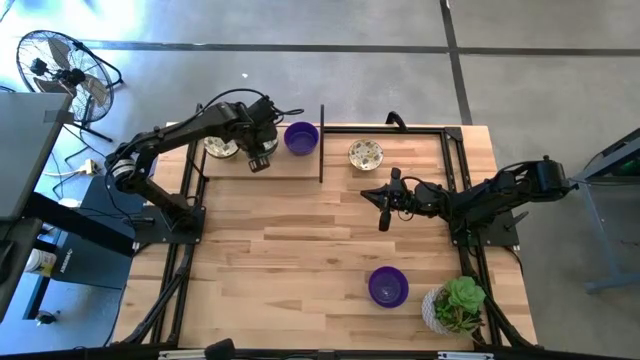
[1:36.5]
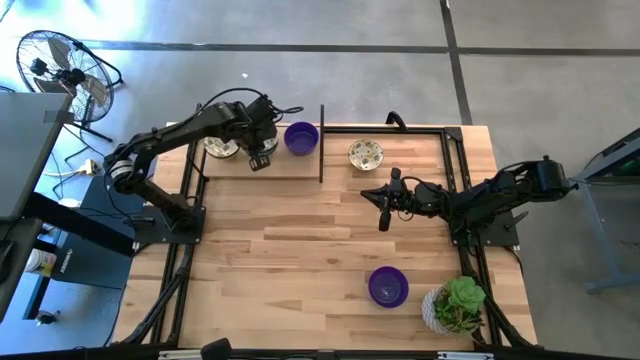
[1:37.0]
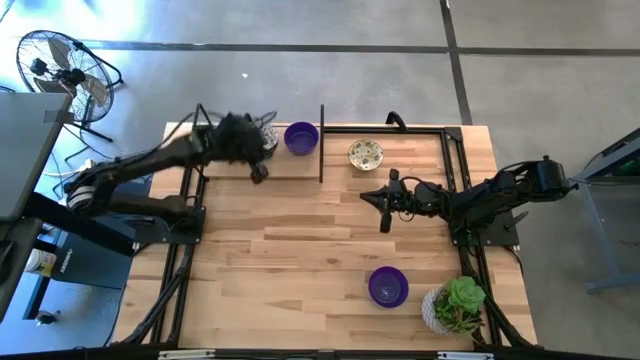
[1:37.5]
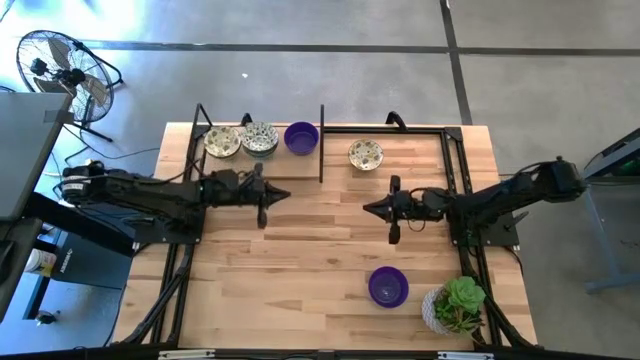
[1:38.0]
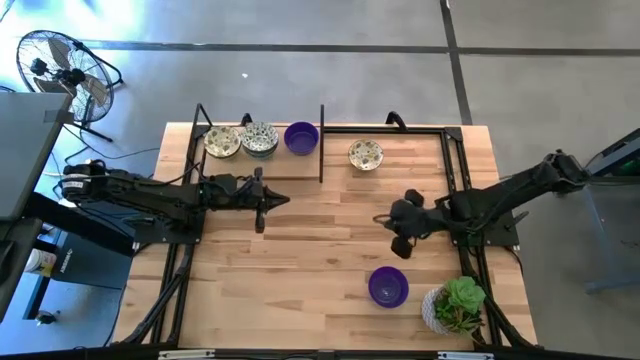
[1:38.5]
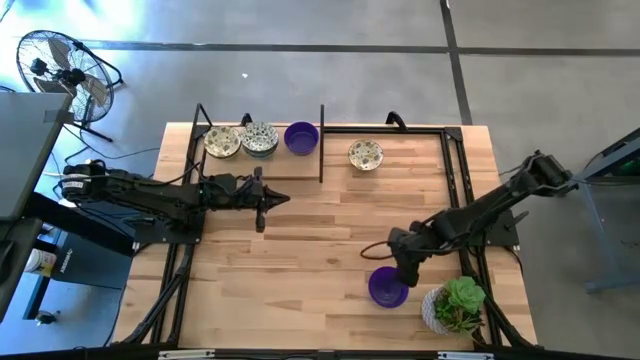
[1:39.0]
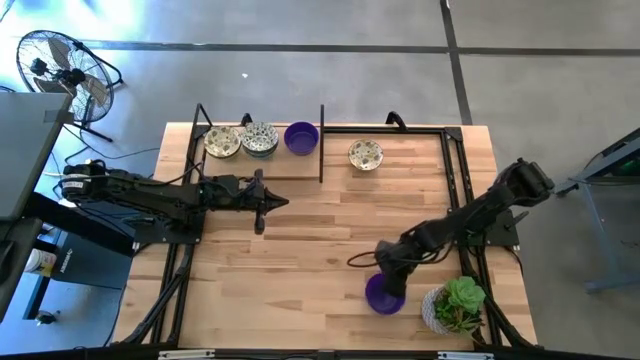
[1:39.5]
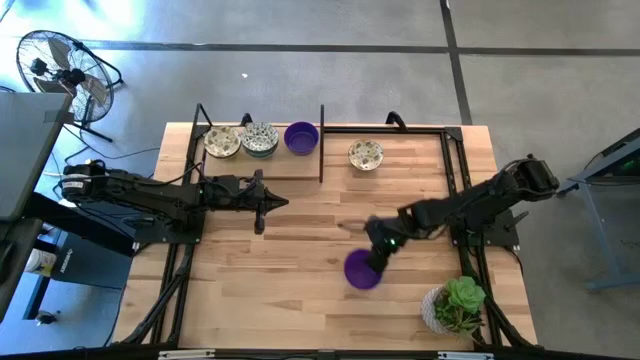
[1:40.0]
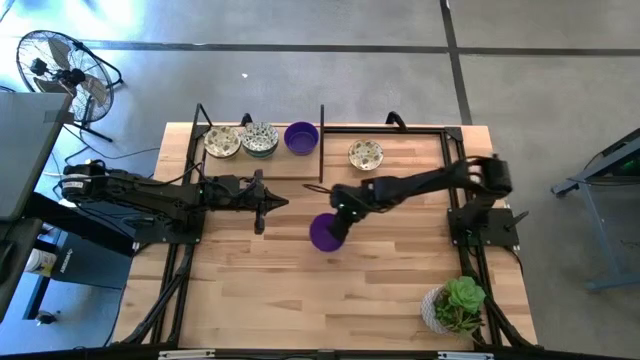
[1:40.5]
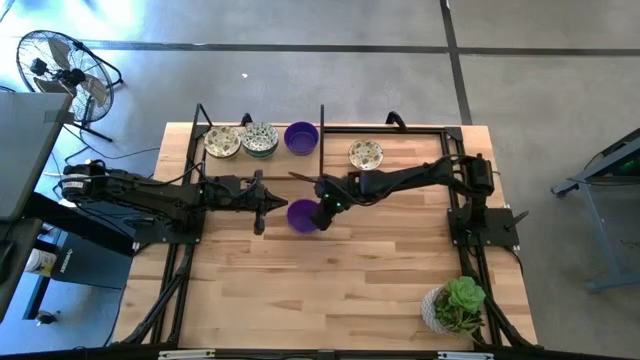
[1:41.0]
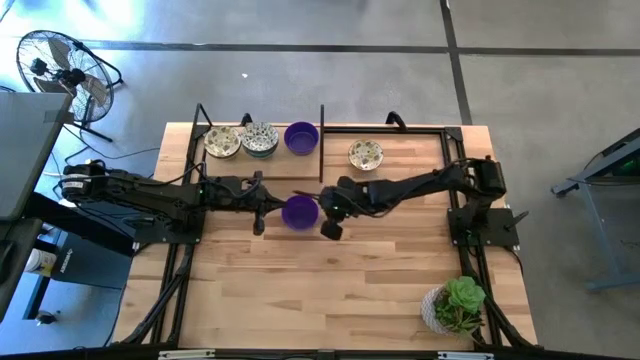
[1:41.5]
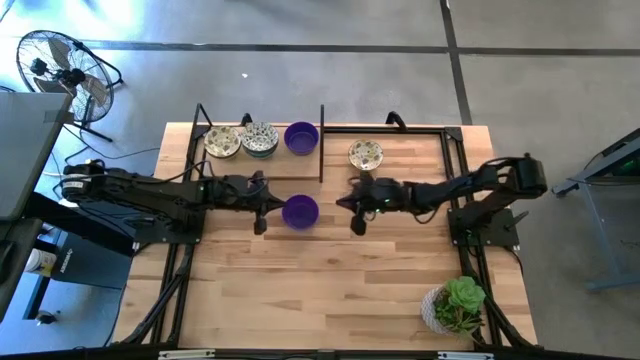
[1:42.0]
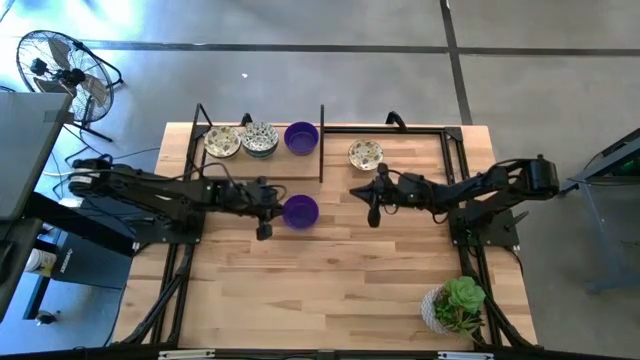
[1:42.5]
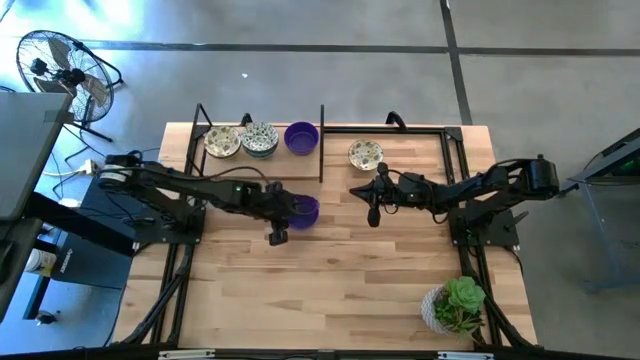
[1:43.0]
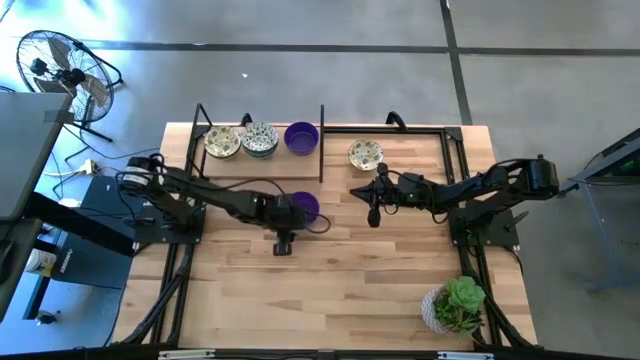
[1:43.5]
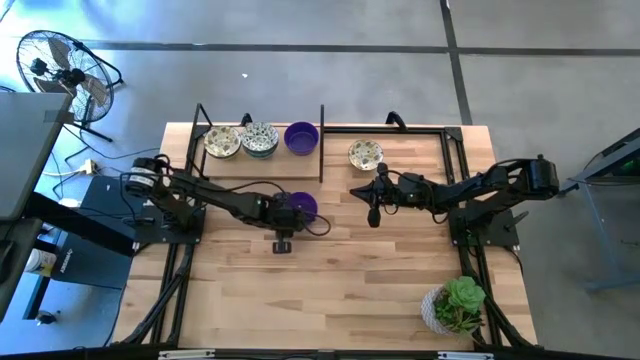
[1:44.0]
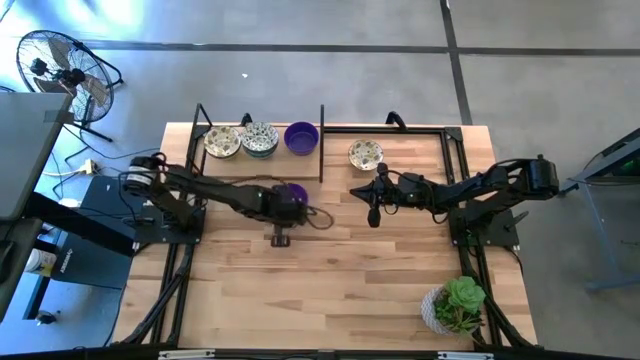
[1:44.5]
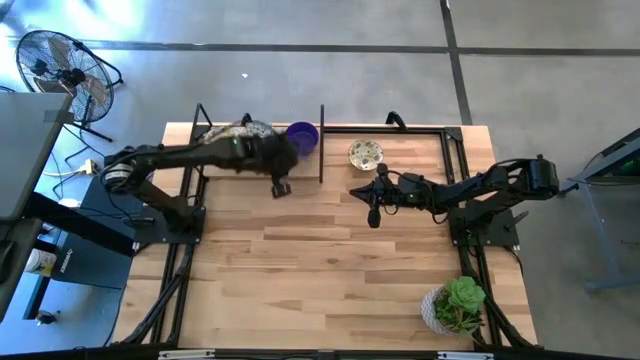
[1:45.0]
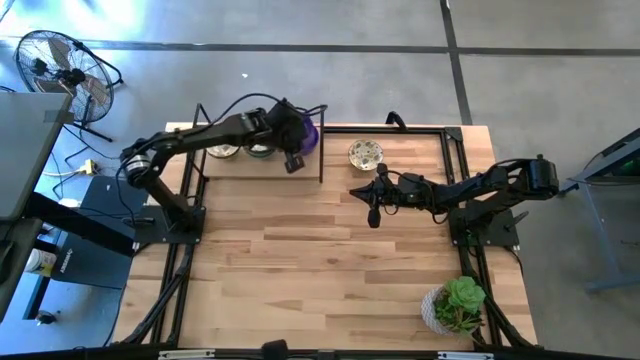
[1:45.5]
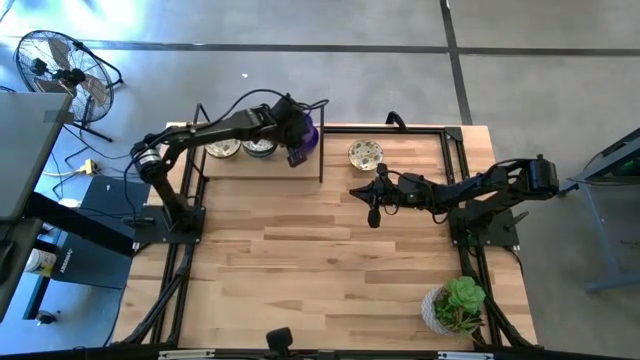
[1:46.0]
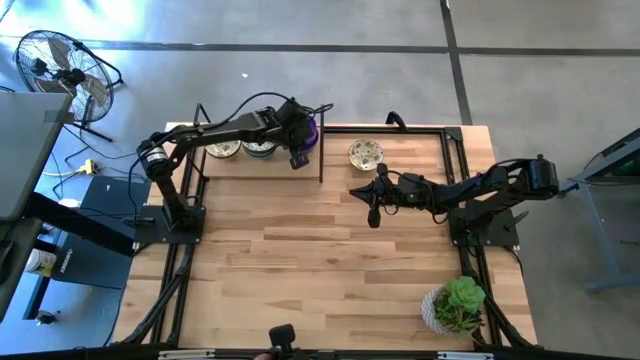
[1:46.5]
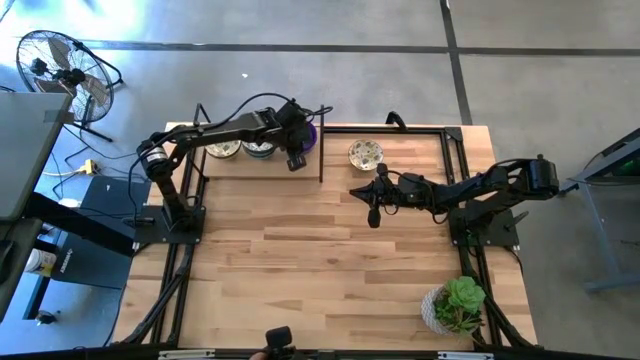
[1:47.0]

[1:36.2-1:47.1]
Task: Pick & Place Mini bowls
Stack the violet bowl on top of the other violet bowls on the shelf

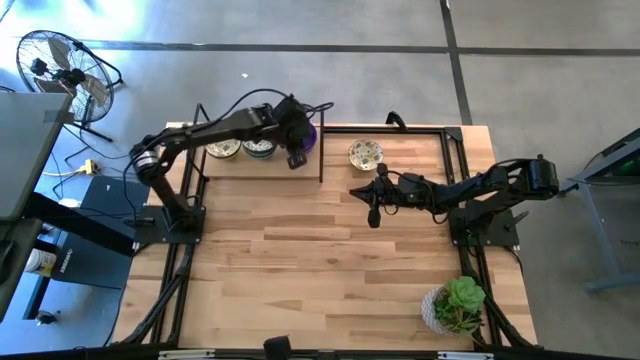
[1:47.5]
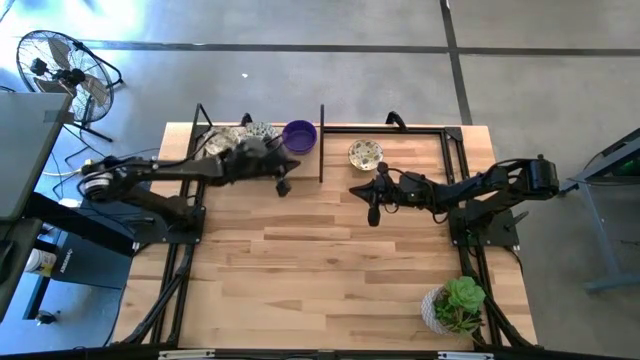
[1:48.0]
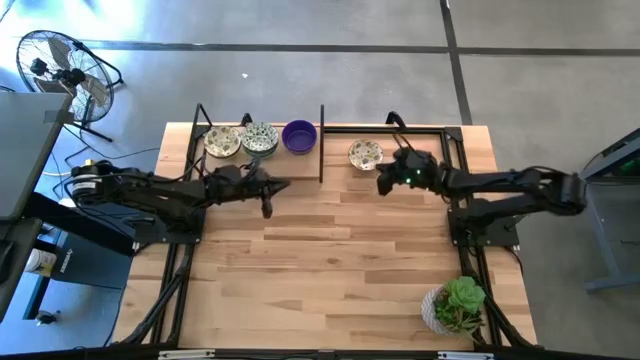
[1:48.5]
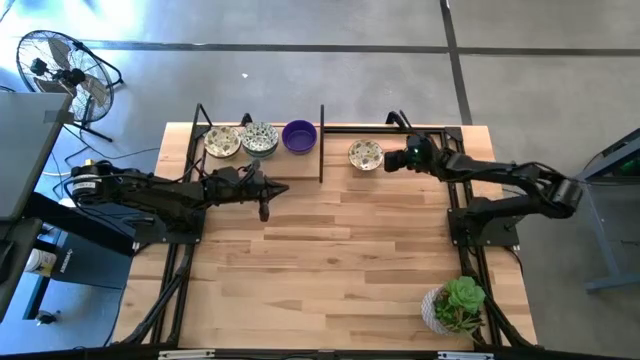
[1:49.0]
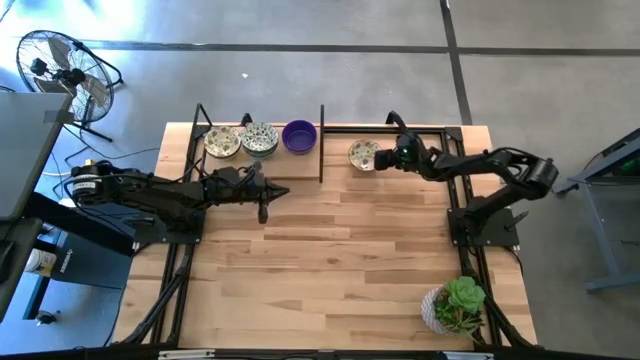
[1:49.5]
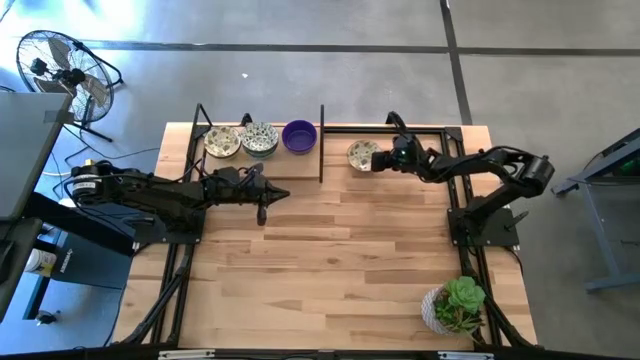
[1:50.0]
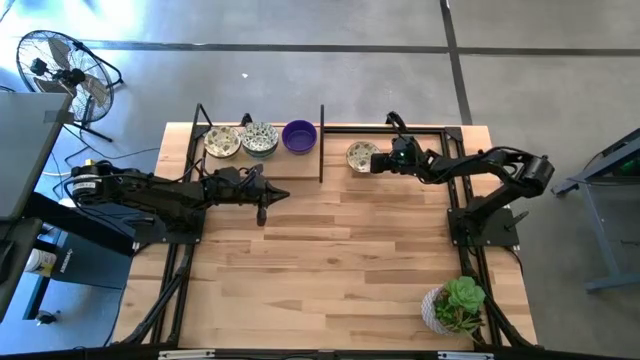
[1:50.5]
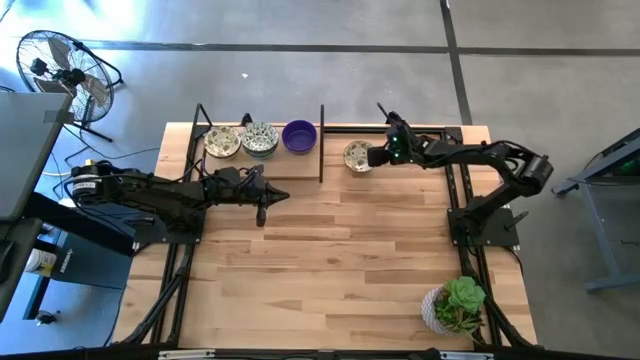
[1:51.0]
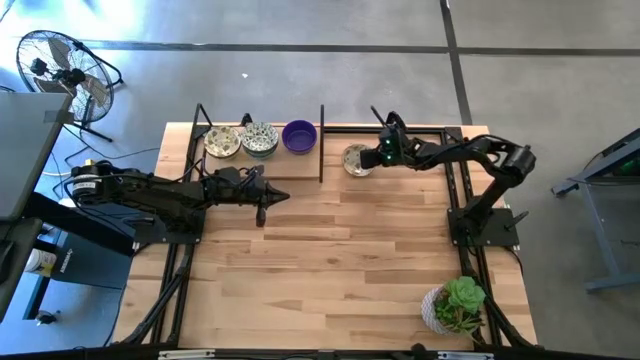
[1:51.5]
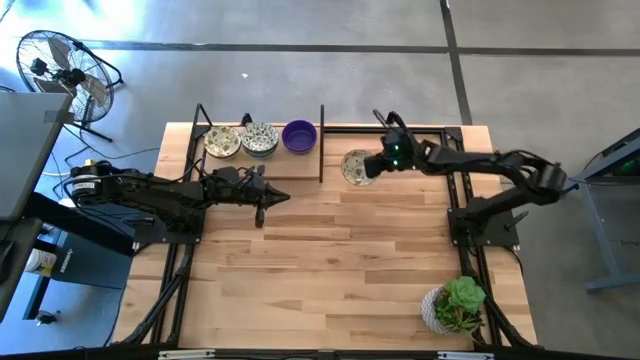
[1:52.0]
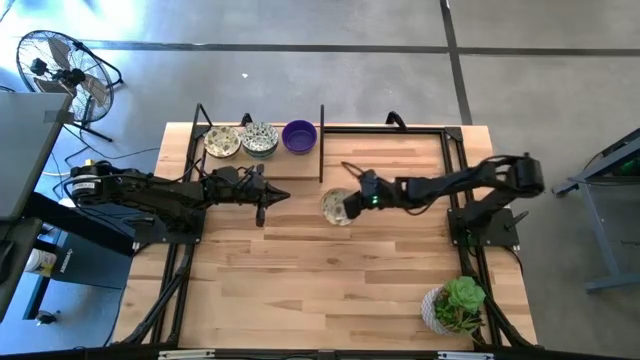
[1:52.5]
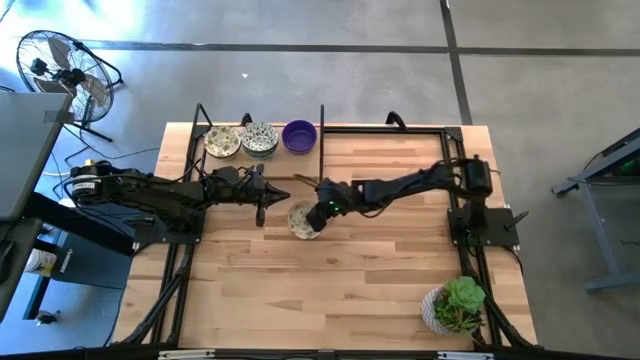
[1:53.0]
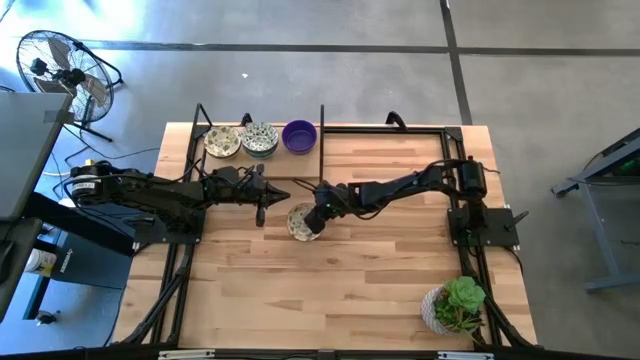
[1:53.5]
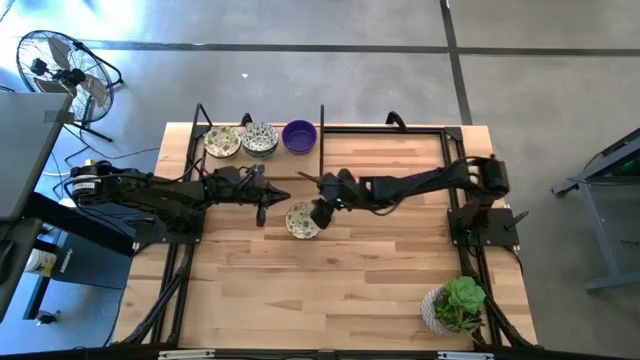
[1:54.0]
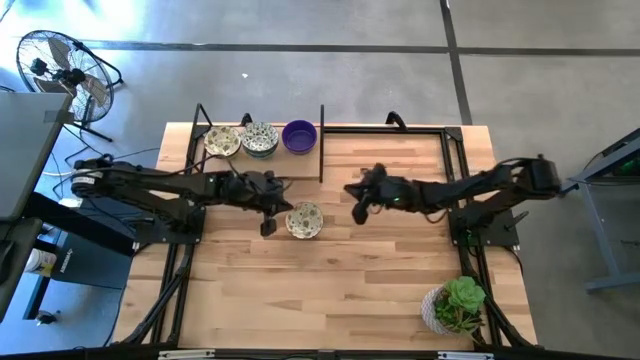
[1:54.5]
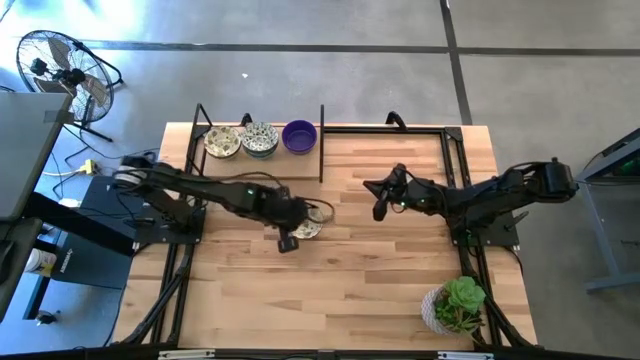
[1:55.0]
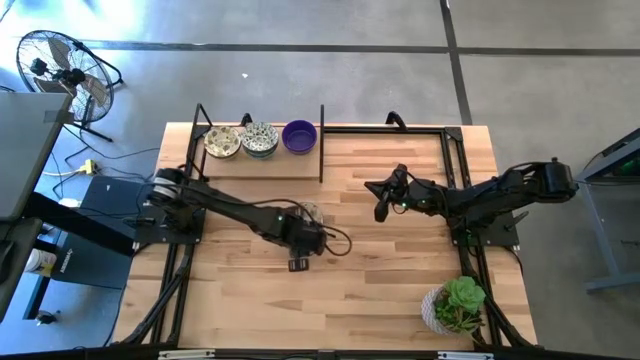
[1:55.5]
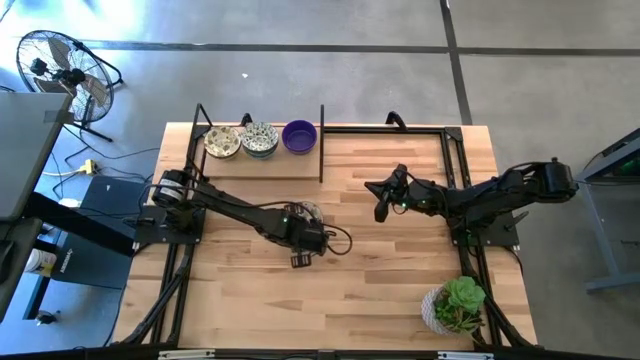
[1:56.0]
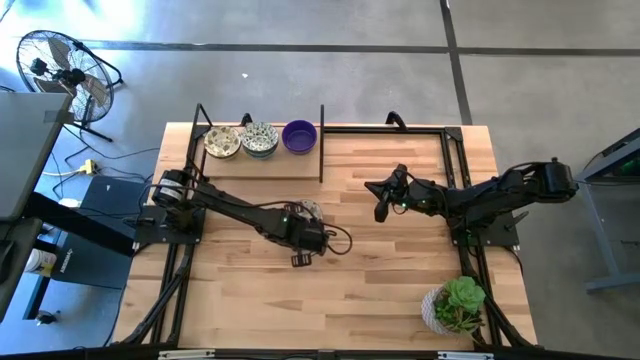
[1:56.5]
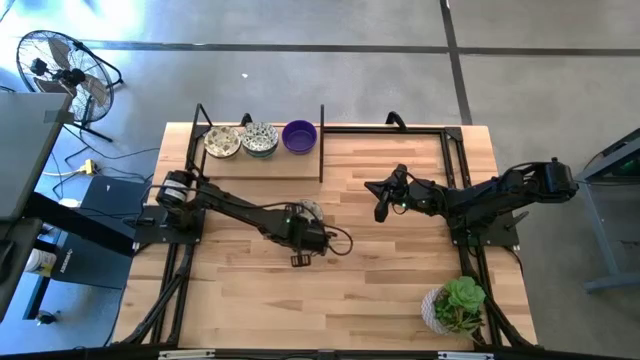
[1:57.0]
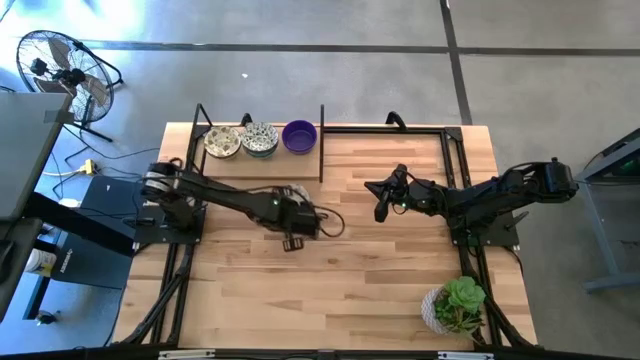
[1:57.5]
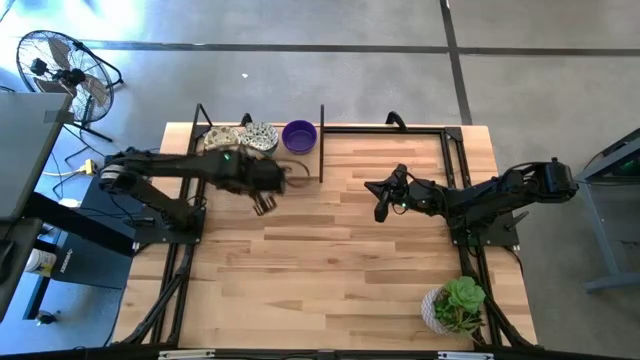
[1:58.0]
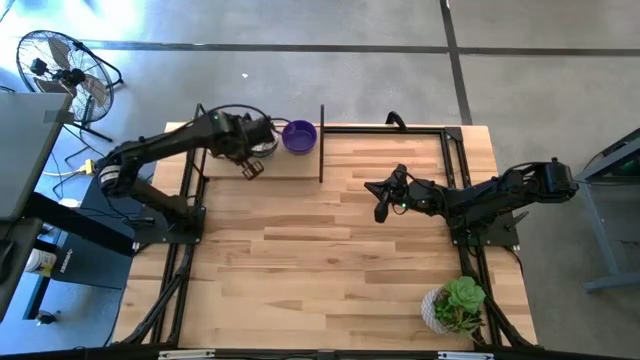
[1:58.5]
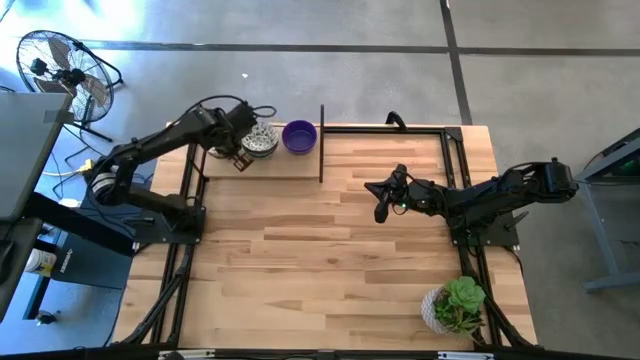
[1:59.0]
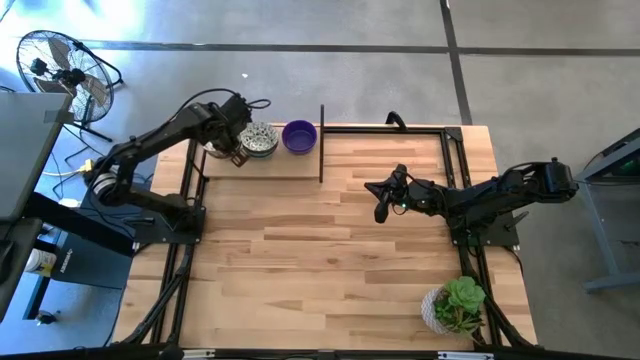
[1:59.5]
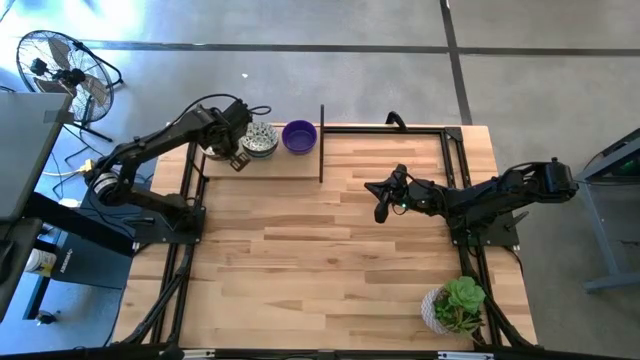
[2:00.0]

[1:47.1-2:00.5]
Stack the yellow bowl on top of the other yellow bowls on the shelf
